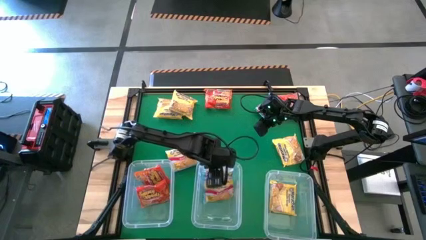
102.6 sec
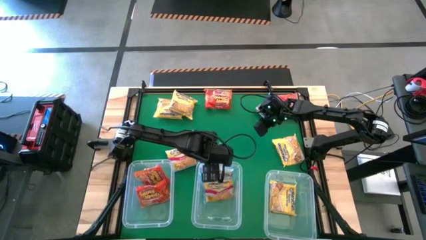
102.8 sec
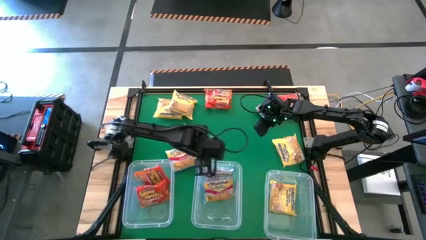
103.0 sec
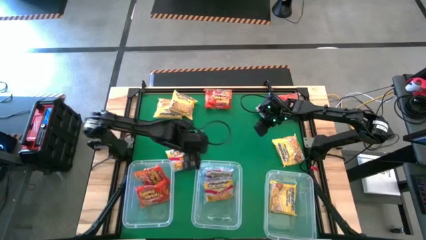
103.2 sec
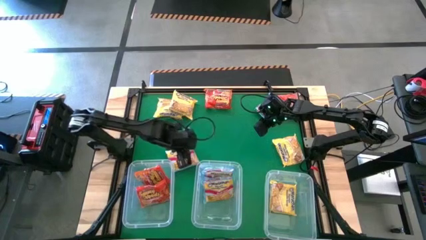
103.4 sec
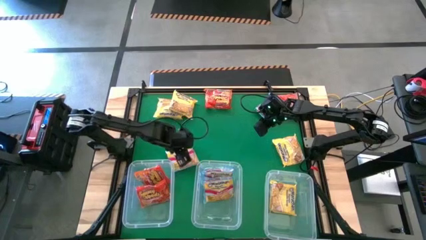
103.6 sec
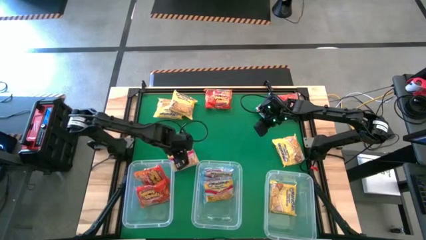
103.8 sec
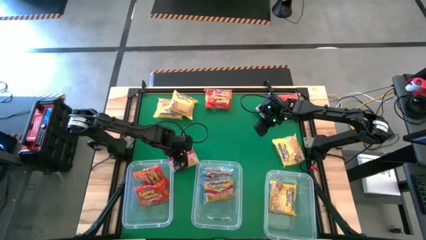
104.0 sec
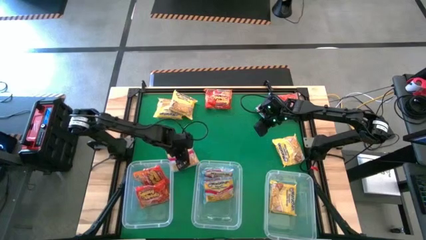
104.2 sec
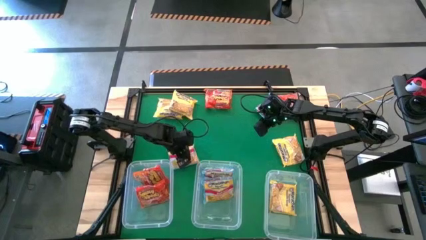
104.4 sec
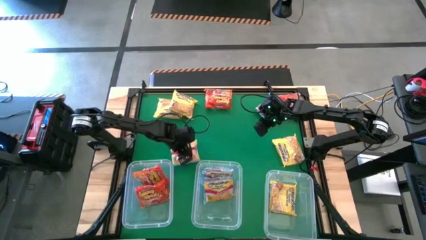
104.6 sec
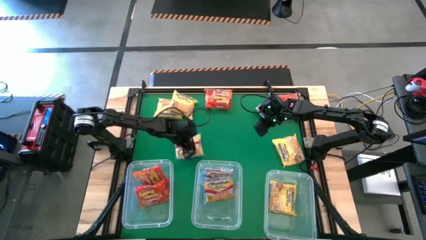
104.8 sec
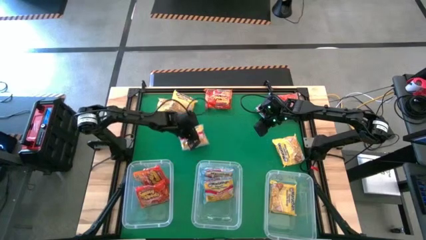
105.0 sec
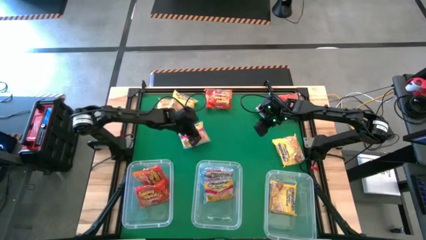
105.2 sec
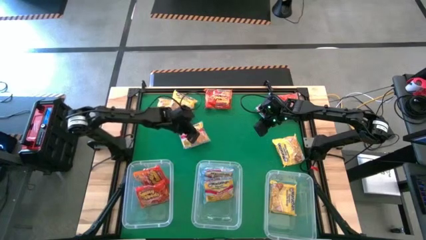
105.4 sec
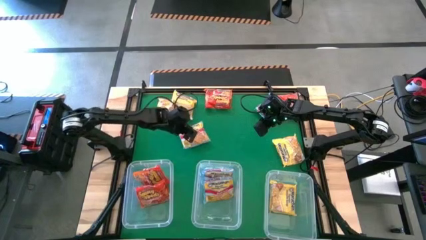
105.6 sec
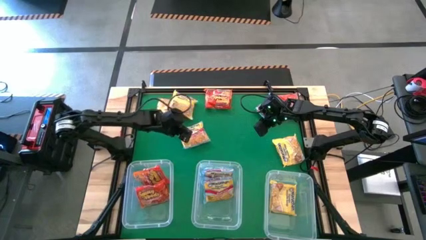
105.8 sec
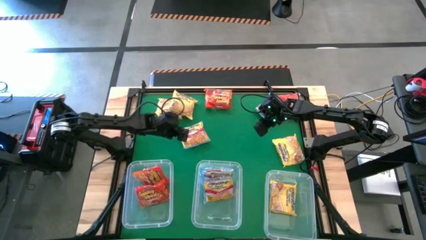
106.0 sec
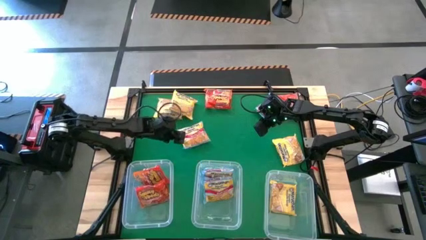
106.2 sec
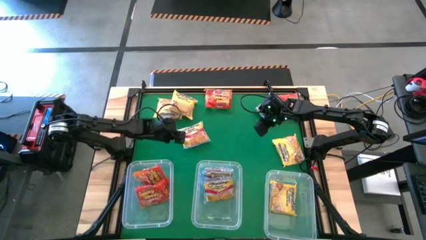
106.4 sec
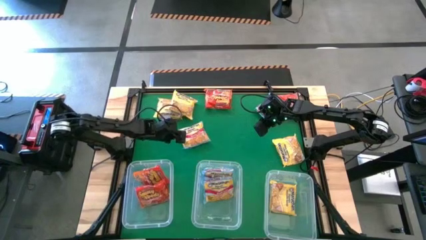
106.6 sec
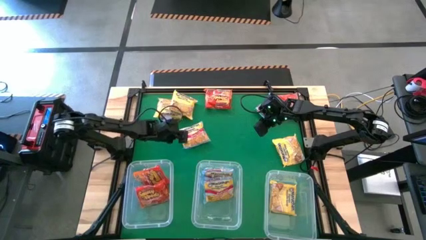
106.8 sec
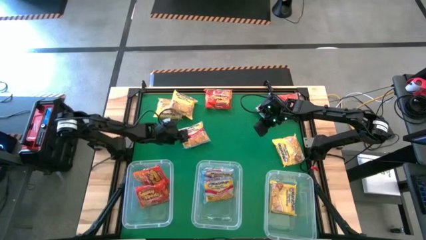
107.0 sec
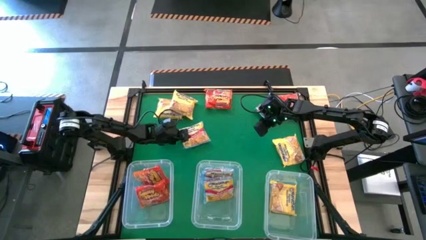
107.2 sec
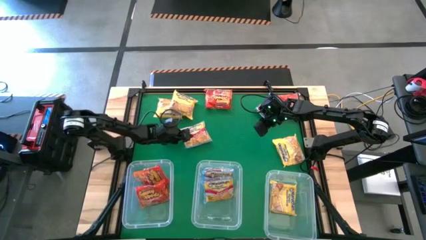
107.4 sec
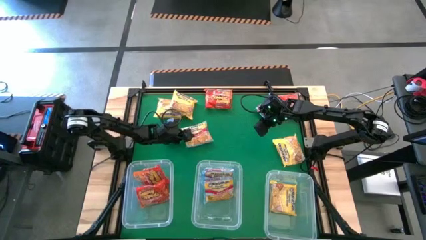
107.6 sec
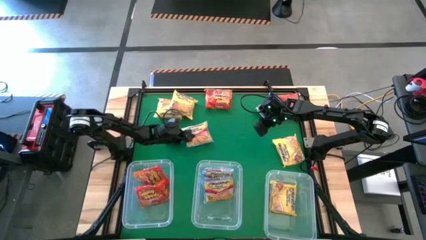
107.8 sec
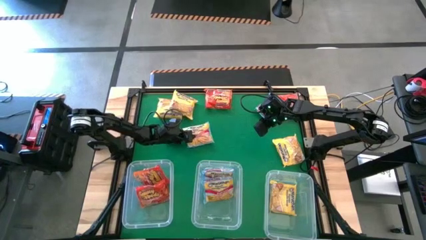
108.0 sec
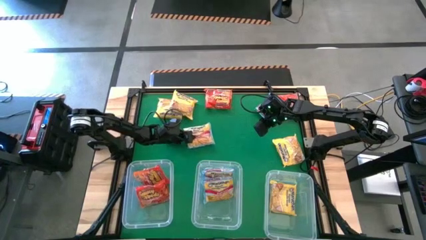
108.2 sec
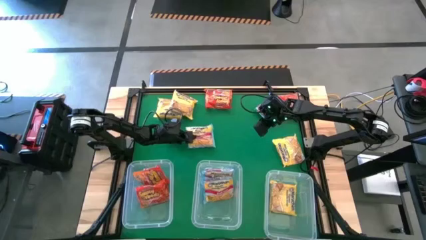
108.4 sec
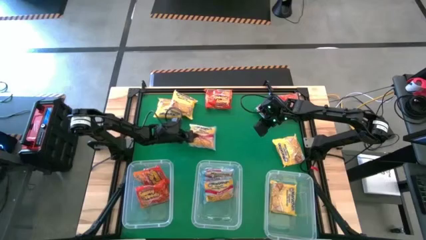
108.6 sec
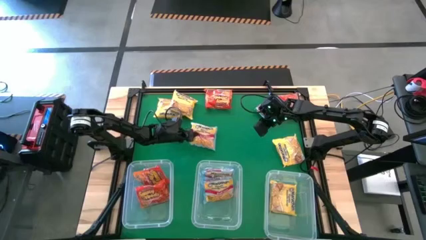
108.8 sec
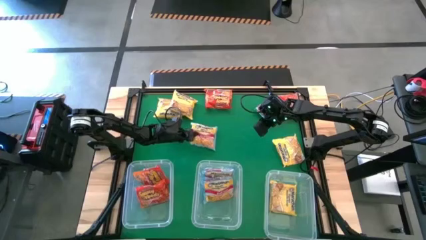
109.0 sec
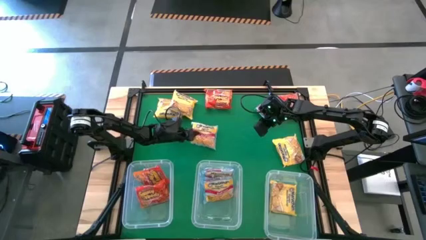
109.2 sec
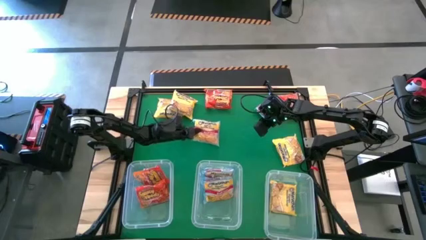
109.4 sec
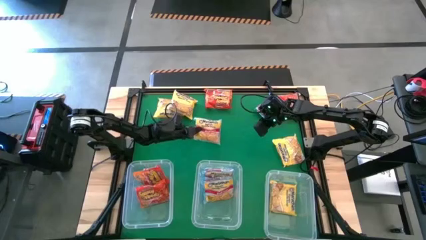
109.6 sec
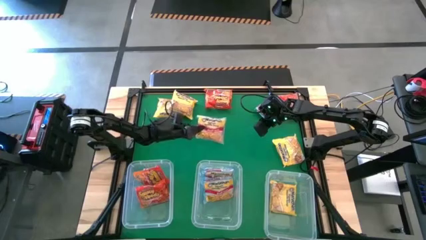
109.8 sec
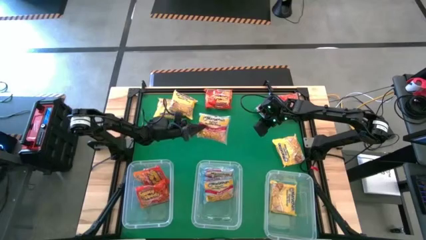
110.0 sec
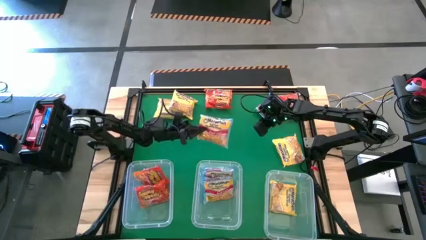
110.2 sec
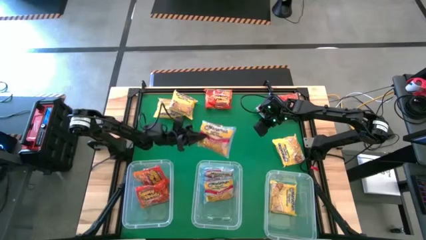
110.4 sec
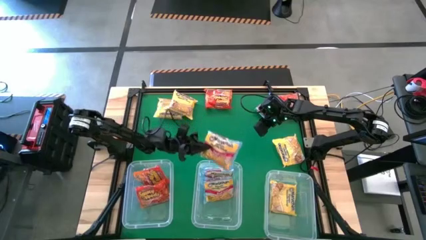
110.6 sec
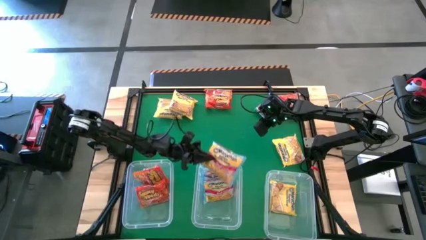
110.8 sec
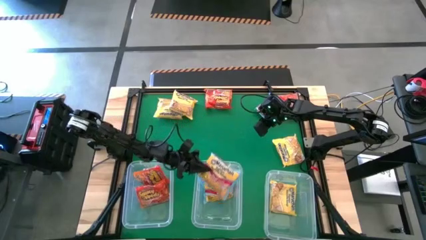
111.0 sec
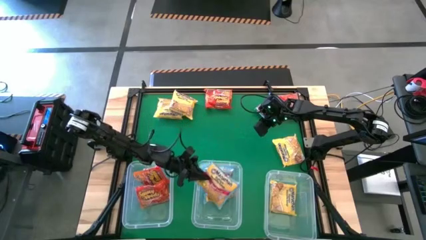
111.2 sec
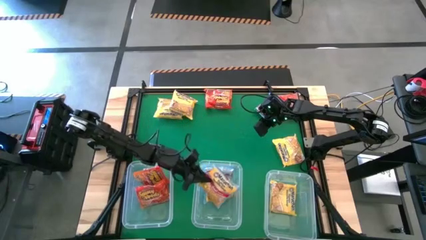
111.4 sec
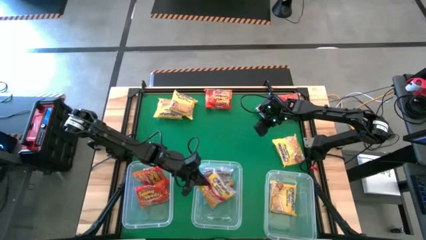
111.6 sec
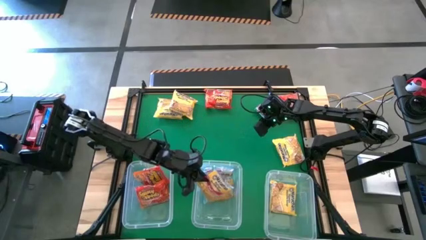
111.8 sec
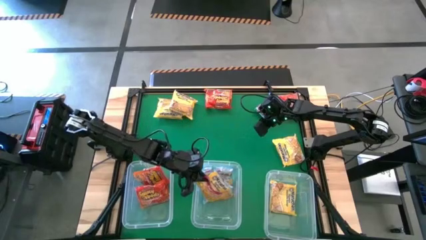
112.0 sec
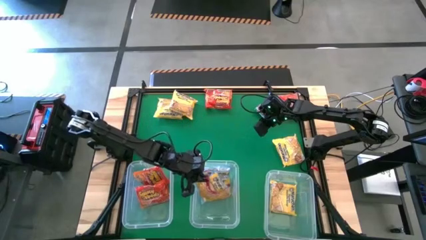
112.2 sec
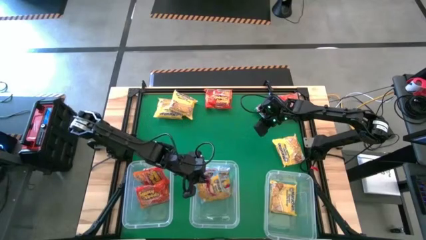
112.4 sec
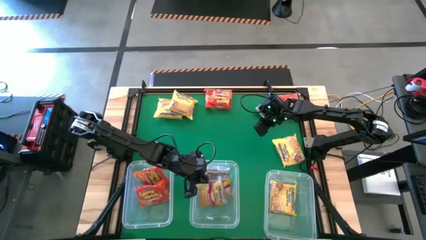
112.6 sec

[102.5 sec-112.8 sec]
Task: Sort Maruchan noodles
Put the blue noodle pack into the middle transparent bin

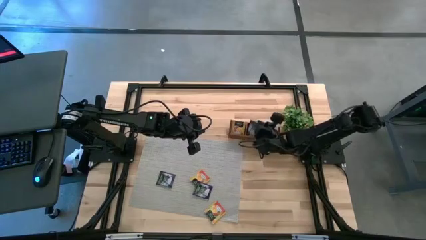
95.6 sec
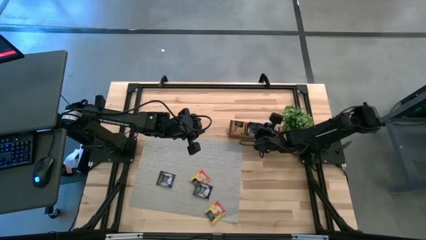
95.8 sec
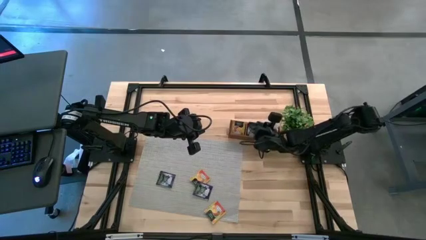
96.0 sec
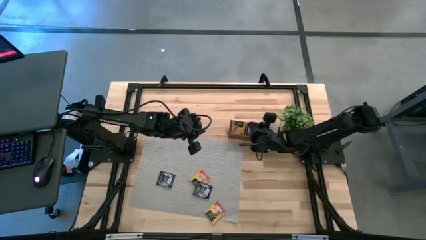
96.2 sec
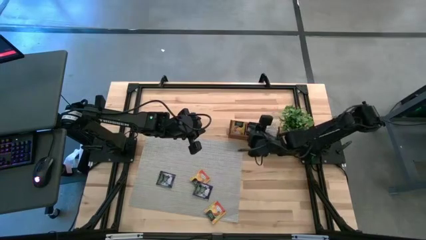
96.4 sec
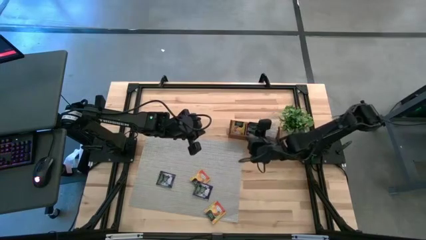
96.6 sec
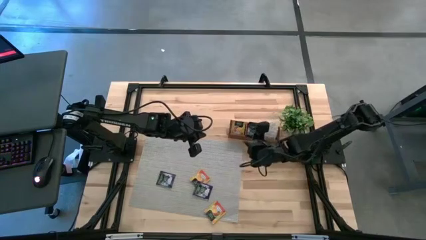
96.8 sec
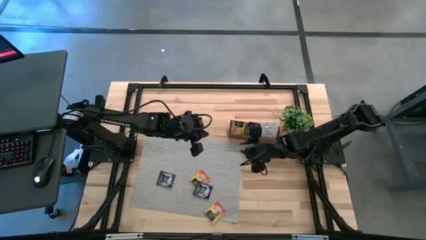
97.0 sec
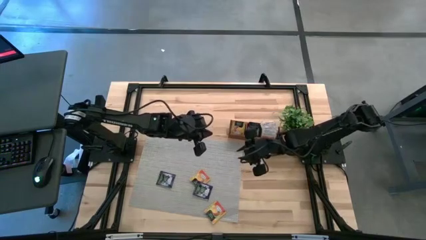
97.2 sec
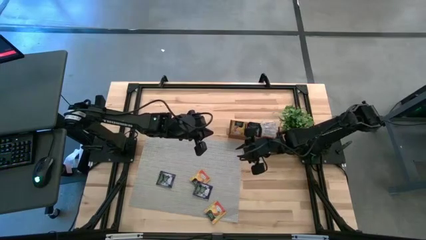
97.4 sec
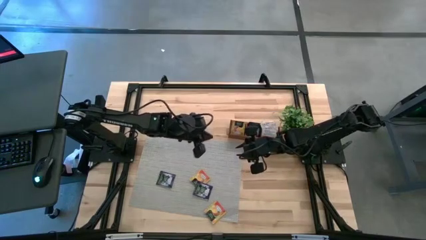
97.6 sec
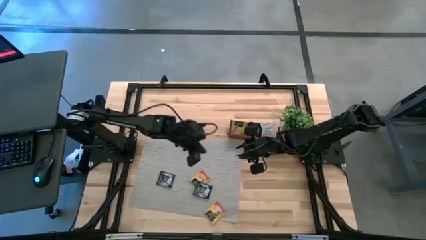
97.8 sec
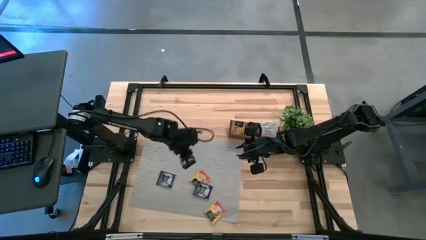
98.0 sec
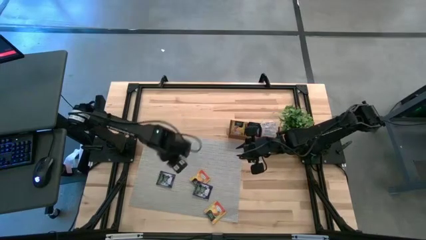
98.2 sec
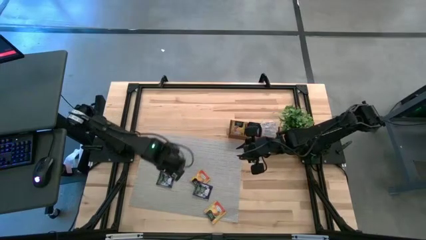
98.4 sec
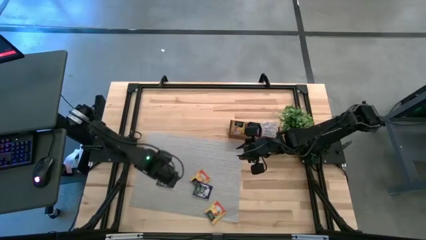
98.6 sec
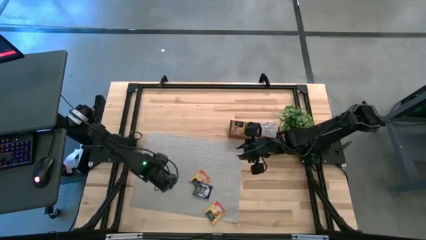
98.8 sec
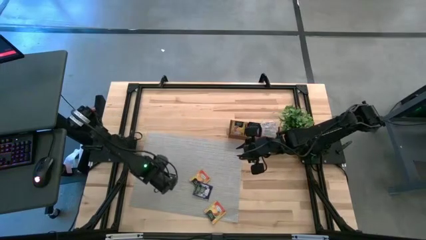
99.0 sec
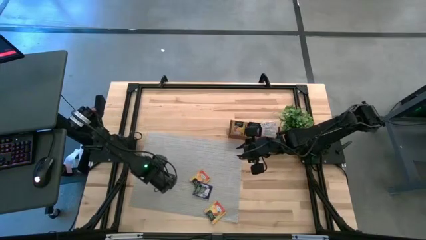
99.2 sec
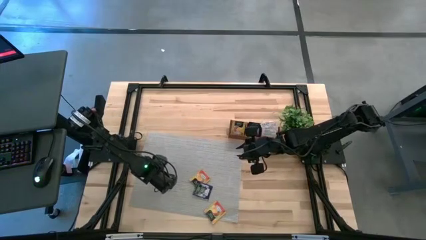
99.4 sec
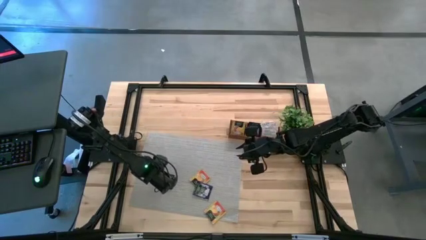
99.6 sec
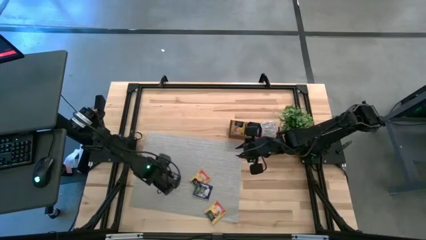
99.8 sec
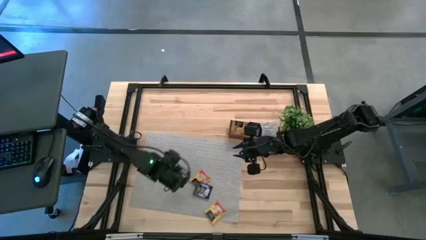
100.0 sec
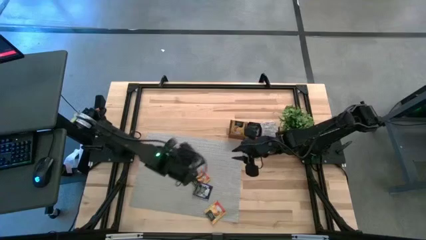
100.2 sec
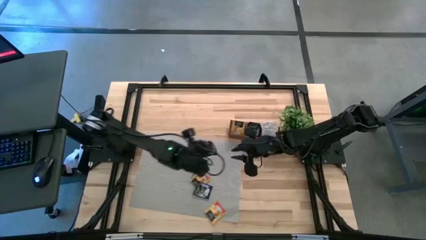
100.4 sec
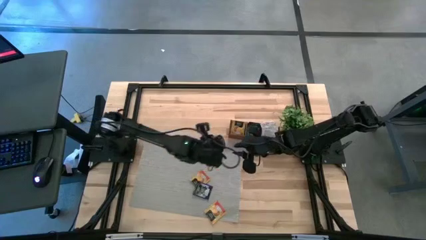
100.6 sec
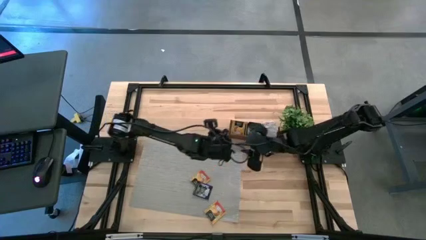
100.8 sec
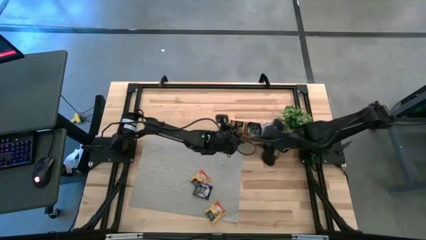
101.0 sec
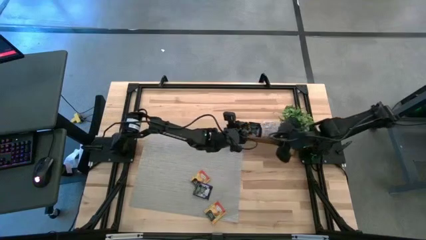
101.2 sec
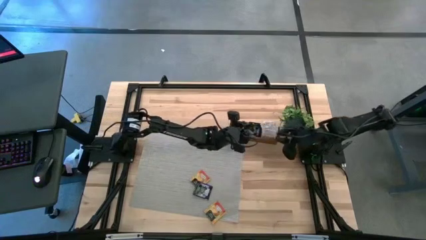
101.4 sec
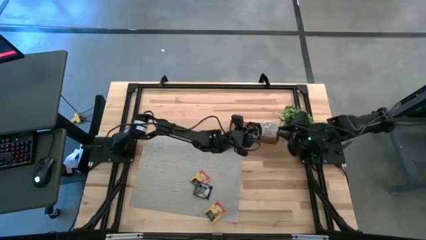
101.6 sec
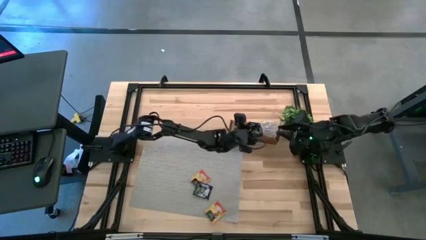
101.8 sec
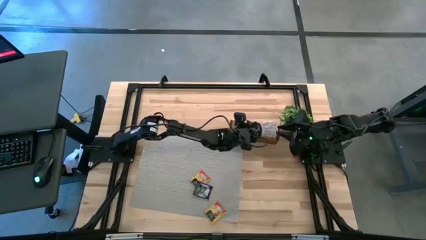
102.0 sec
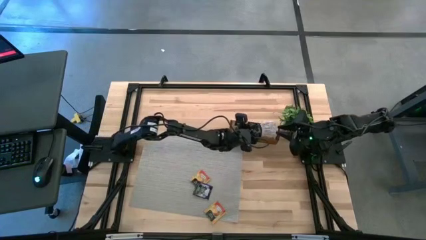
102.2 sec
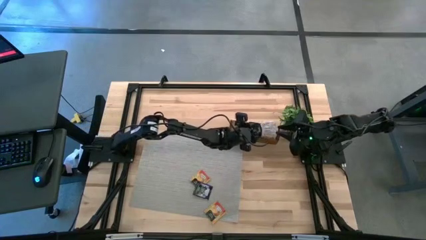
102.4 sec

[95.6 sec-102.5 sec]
Task: Pick & Place Tea
Put the dark purple tea bag in the middle section of the wooden organizer
